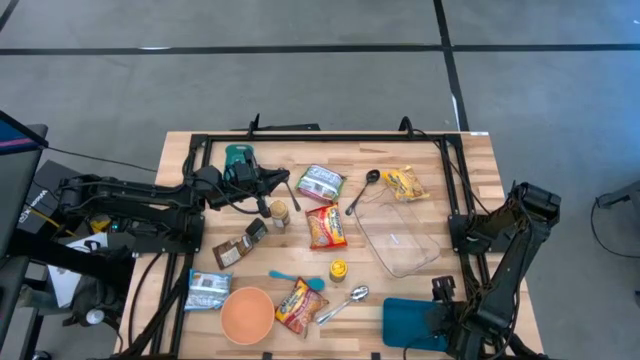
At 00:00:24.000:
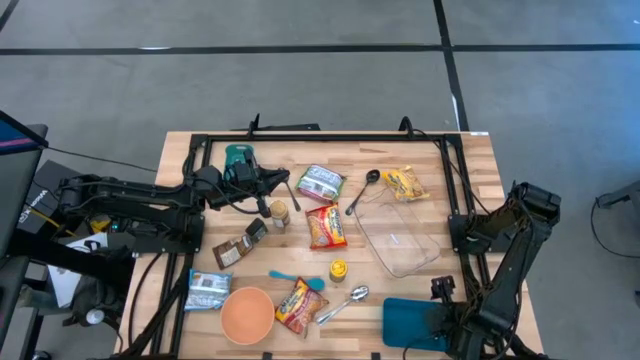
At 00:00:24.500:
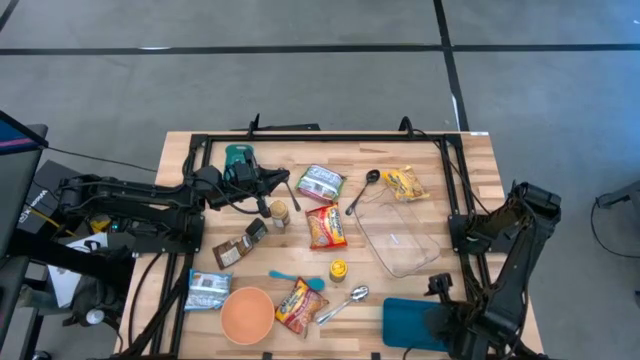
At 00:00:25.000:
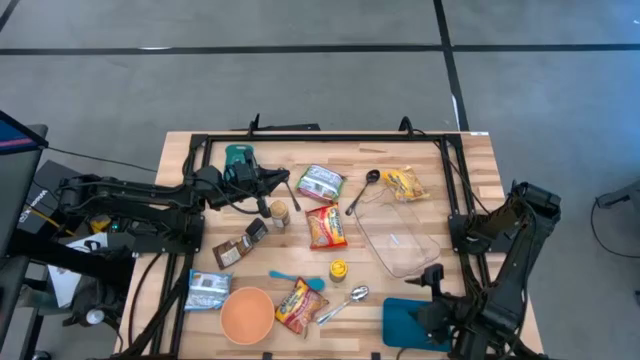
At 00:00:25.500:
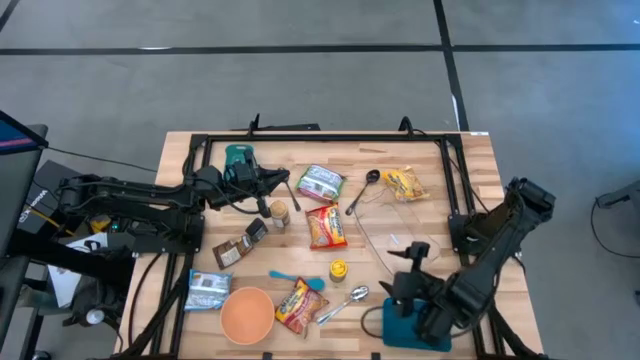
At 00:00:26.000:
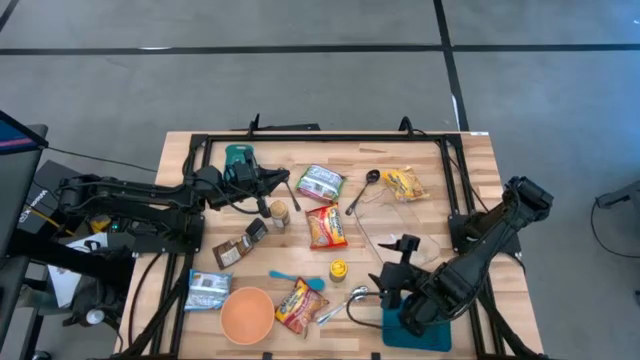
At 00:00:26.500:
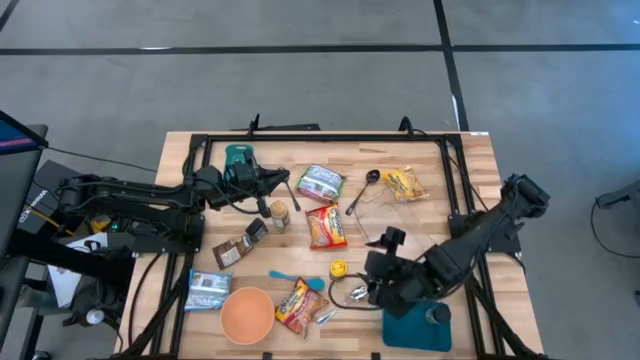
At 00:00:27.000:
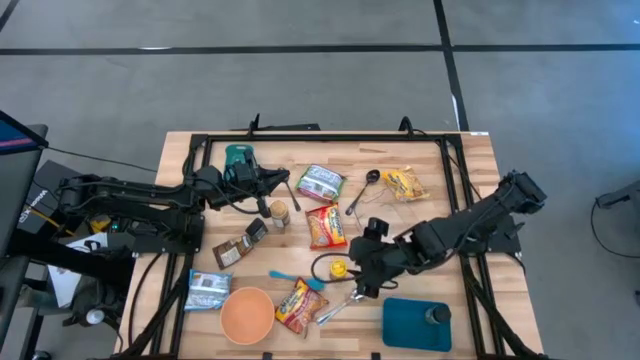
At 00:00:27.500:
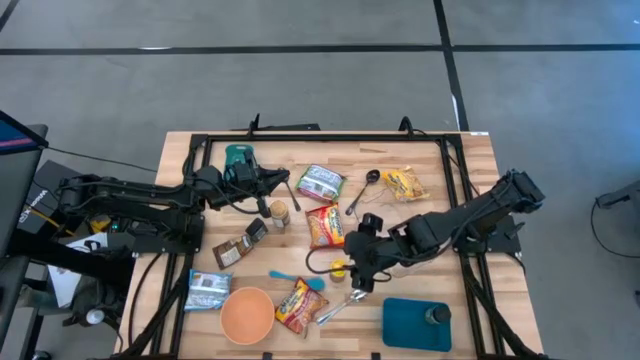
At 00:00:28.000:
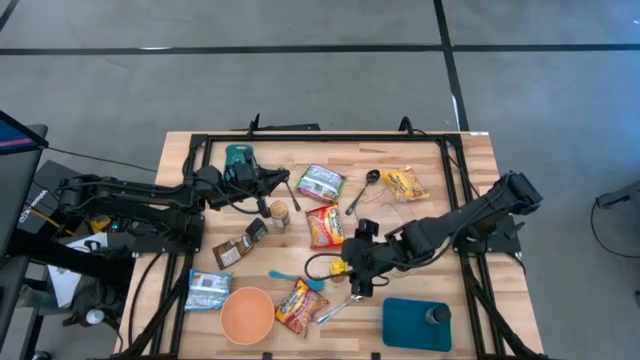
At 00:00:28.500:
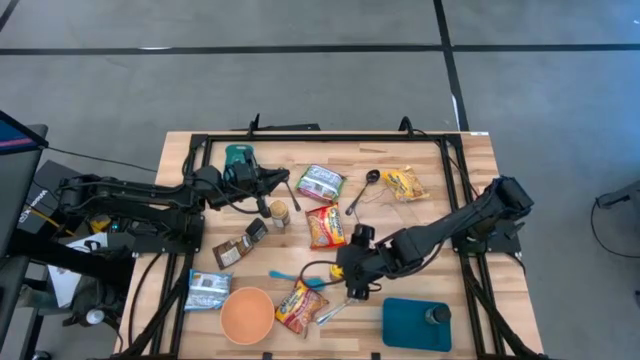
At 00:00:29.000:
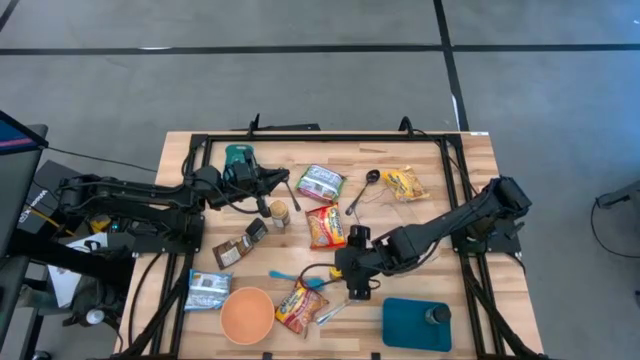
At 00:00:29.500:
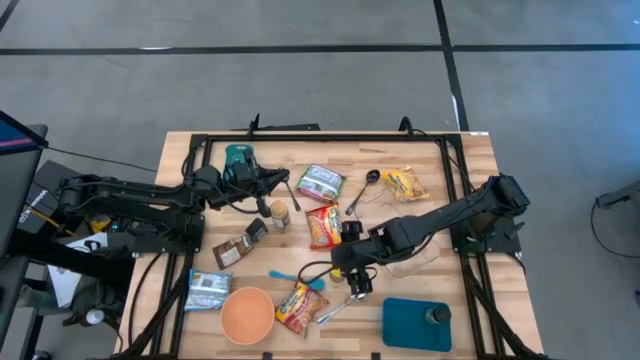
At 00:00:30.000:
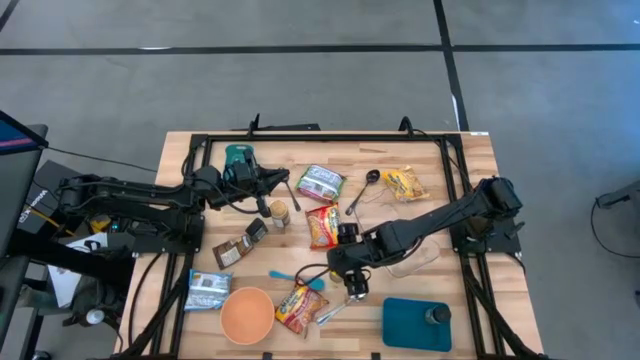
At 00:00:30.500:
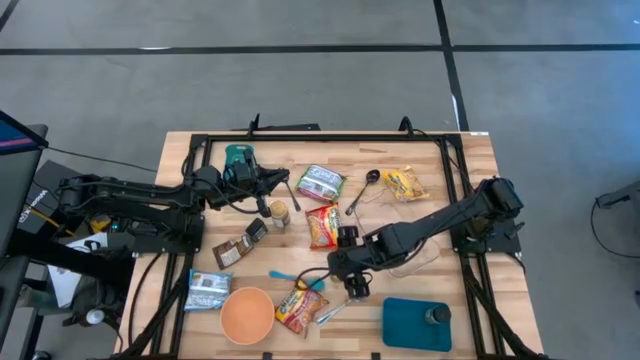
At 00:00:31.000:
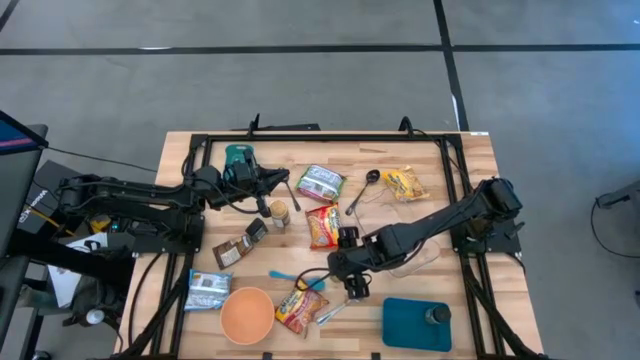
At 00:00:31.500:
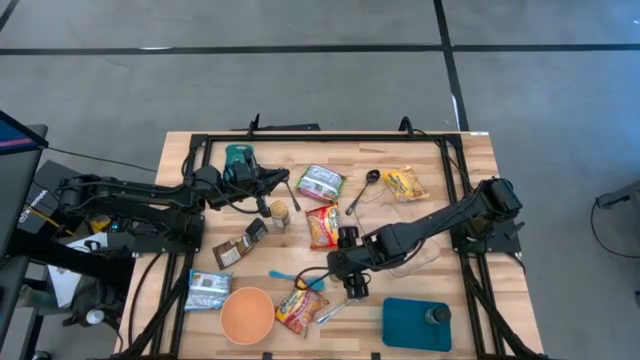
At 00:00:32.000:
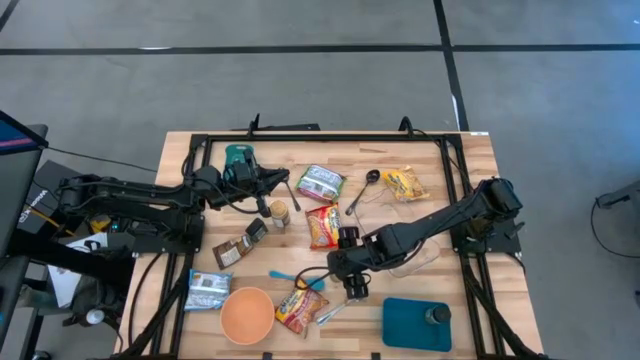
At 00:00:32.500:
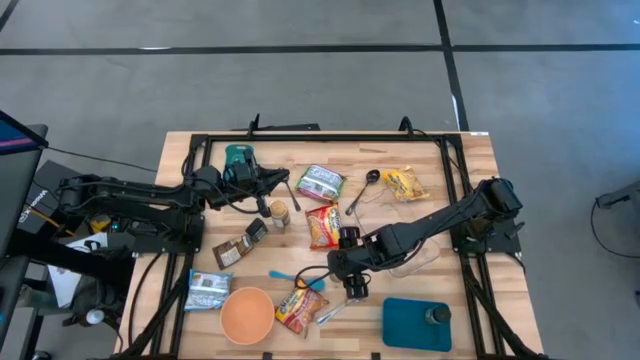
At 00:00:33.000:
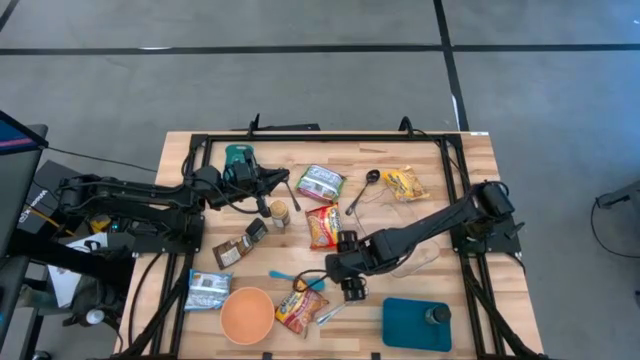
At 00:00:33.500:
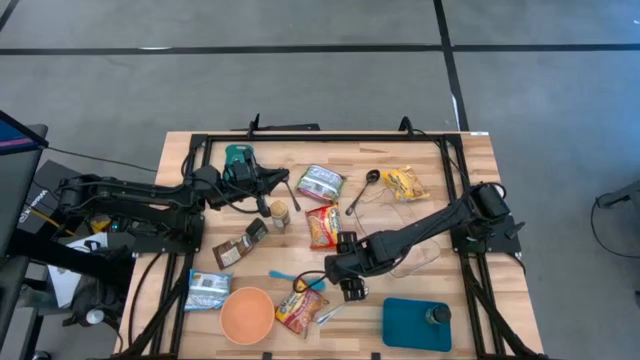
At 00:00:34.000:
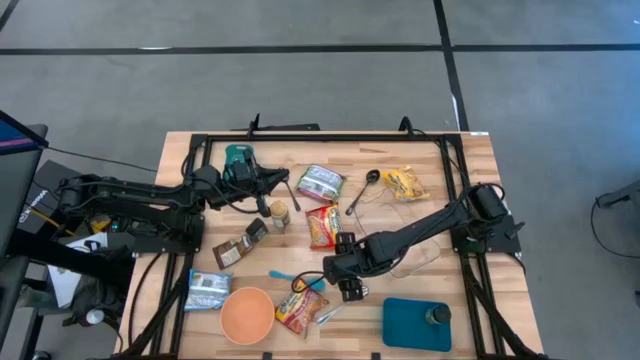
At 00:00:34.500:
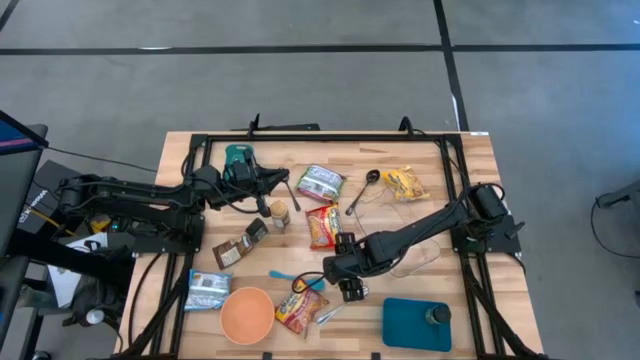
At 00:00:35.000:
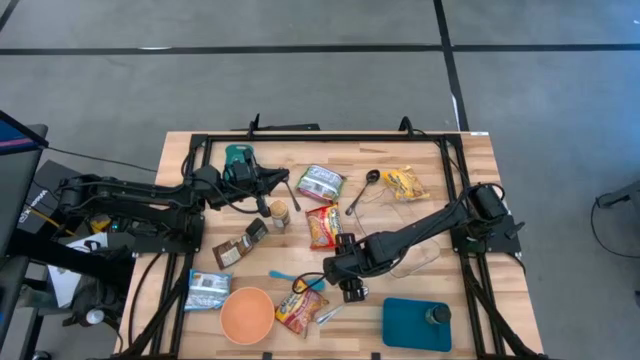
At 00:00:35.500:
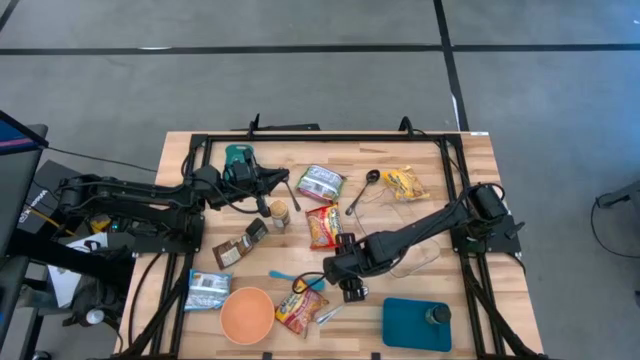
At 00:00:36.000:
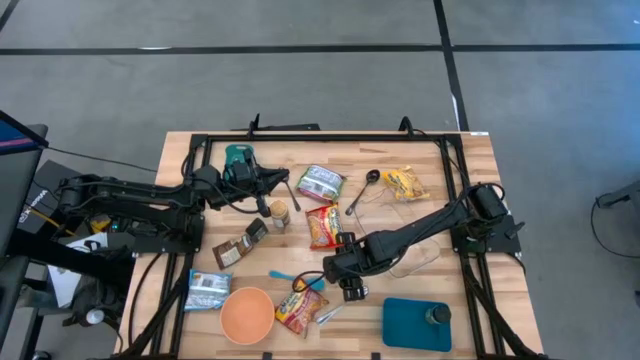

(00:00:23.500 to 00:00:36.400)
Task: Pick & Place Food Item
Put the yellow spice bottle into the blue bin

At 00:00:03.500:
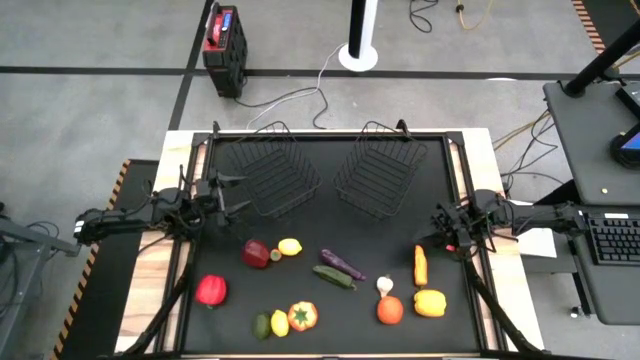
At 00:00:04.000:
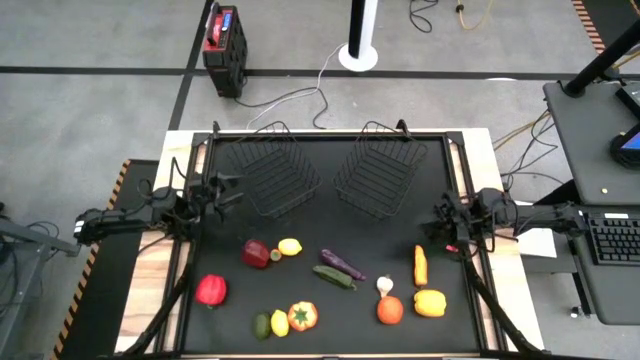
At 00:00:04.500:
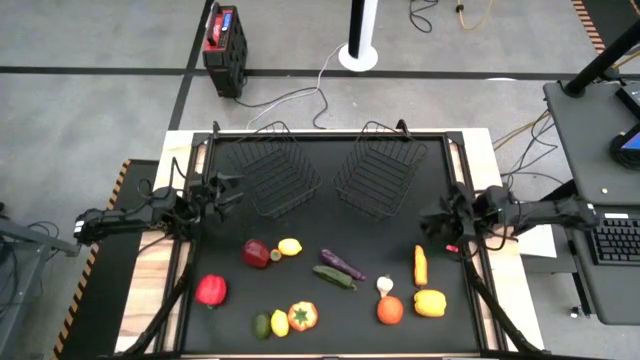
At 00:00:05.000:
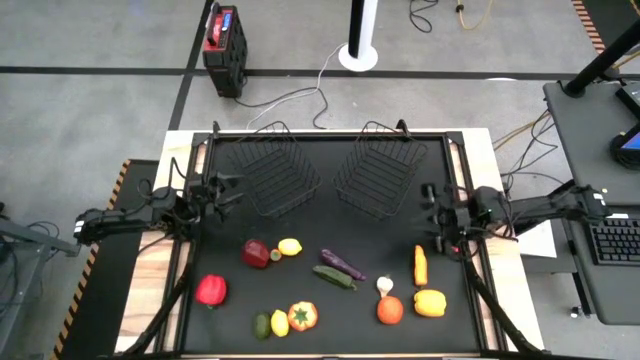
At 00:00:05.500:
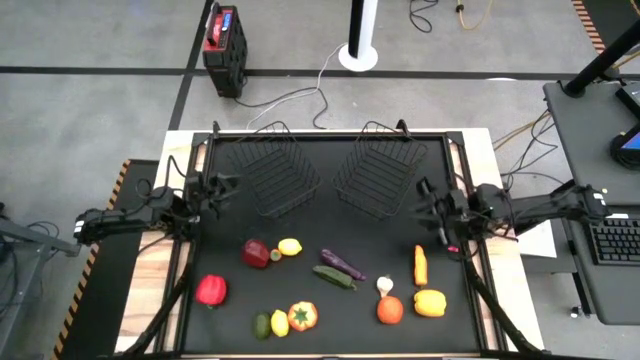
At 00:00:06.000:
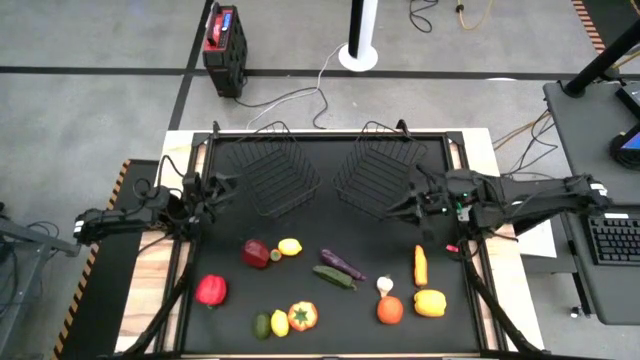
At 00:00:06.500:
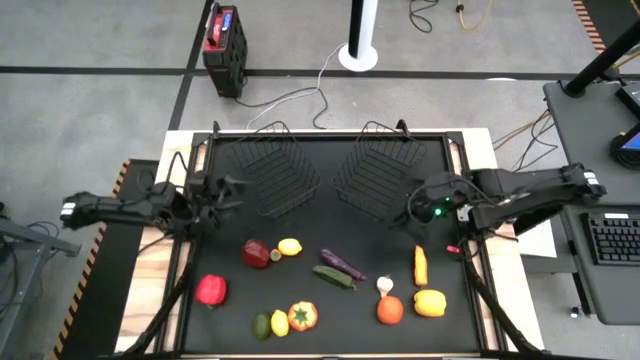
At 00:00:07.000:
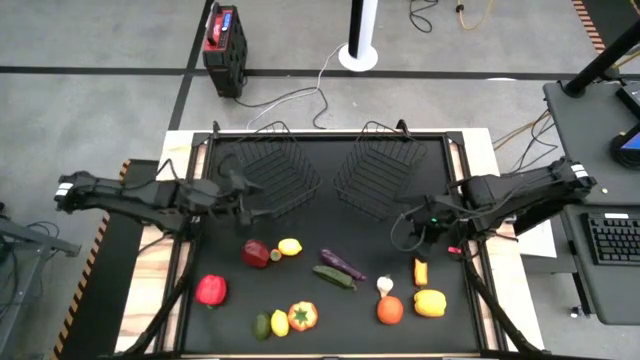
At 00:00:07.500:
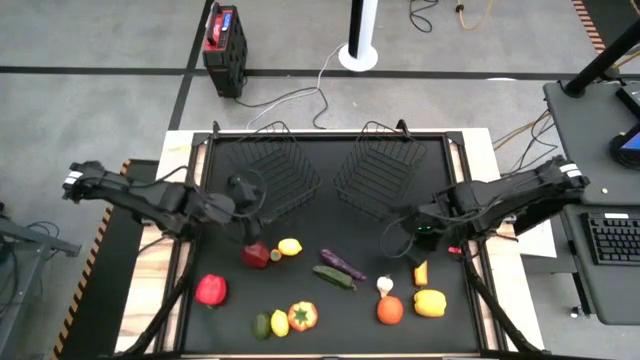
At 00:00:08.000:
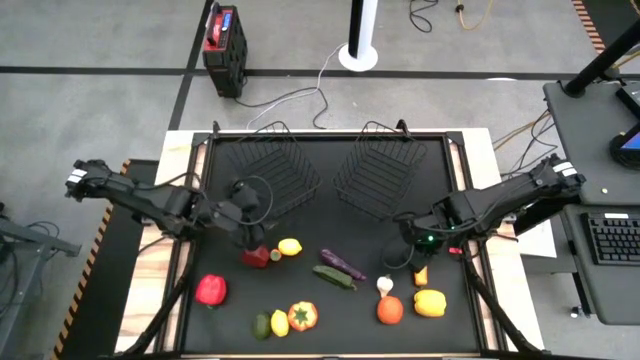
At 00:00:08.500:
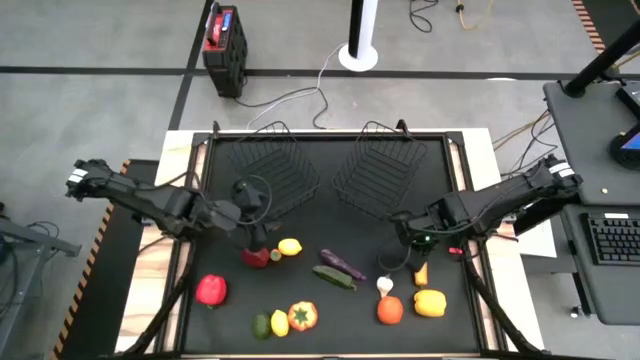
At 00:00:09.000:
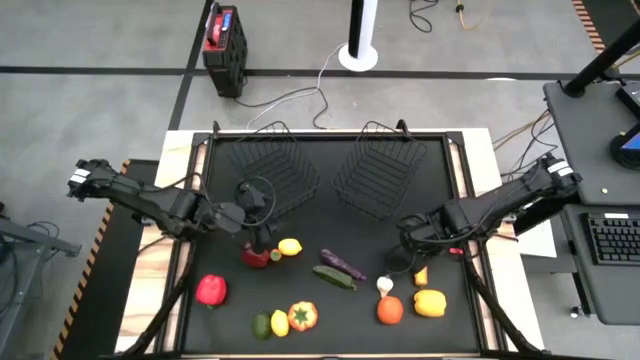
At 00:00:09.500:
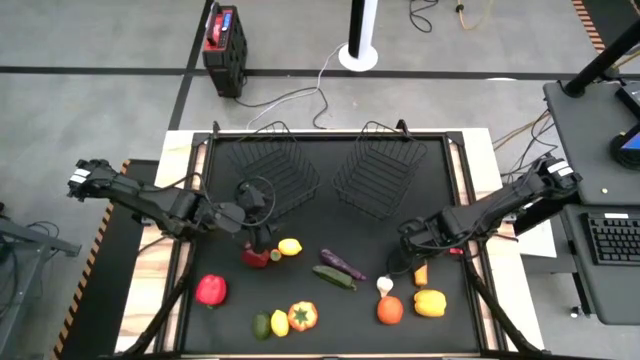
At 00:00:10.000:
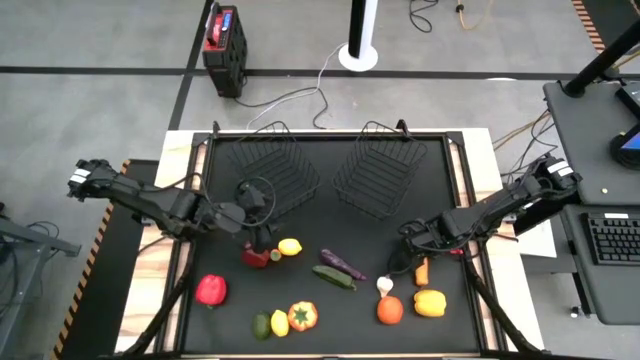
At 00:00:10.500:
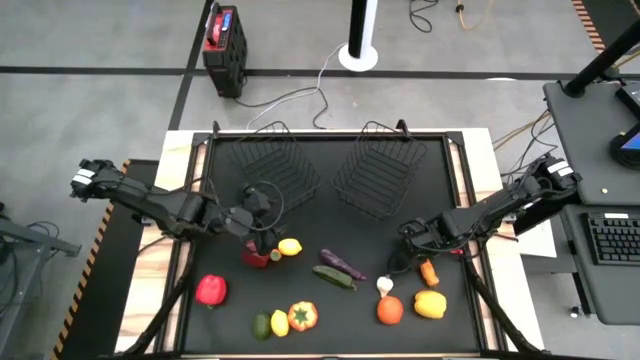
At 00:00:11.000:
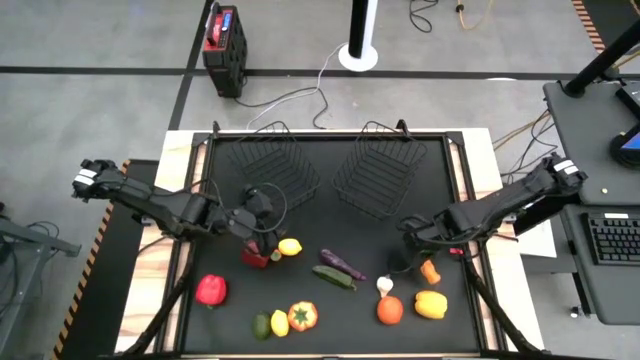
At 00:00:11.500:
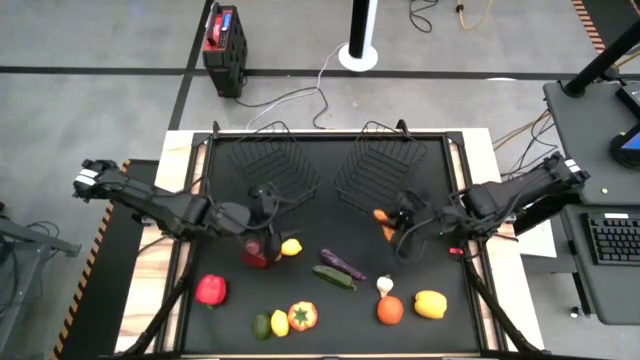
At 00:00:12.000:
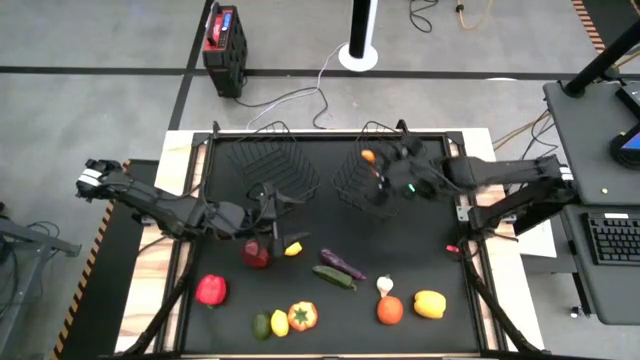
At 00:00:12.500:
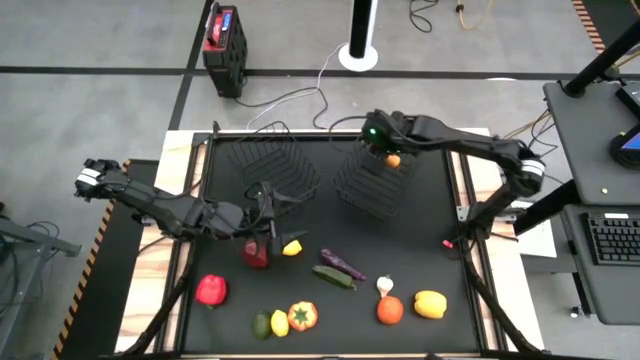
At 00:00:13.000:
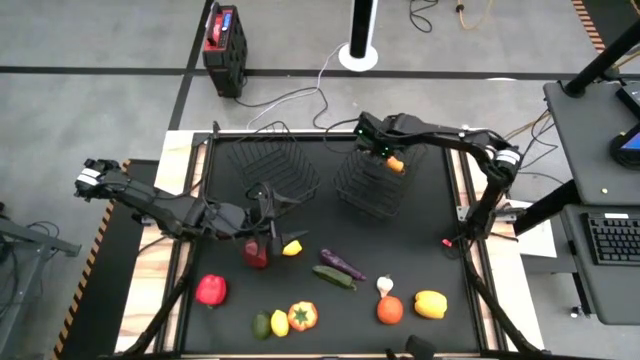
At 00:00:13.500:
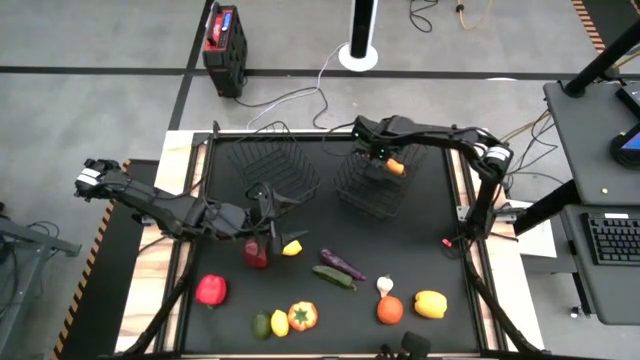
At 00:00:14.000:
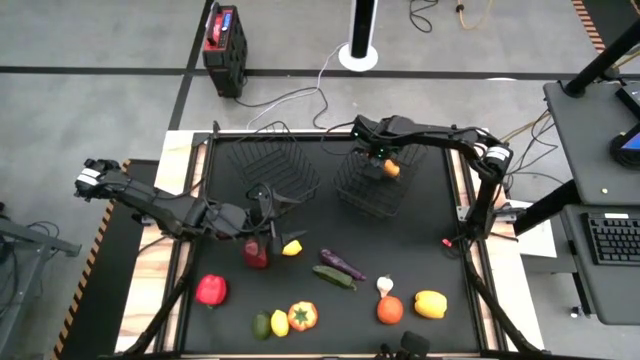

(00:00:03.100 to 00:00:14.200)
Task: Sort produce into baskets
Put the yellow chili pepper into the right black wire basket
